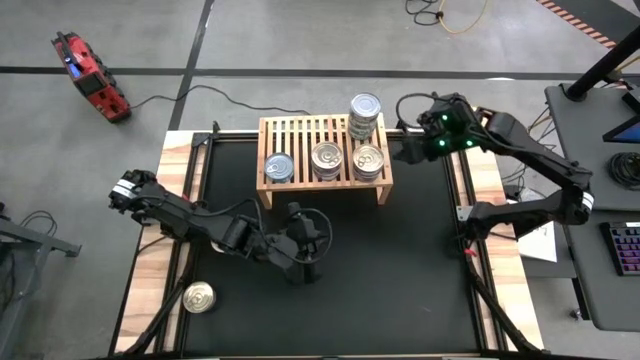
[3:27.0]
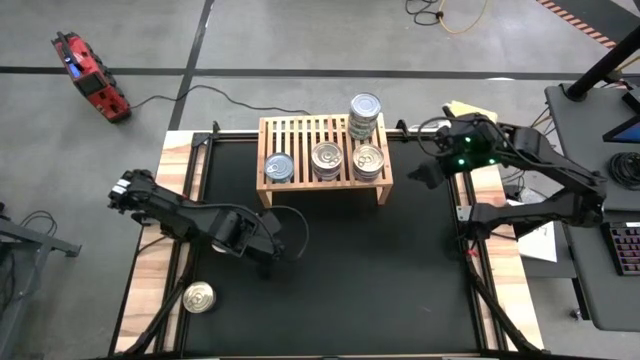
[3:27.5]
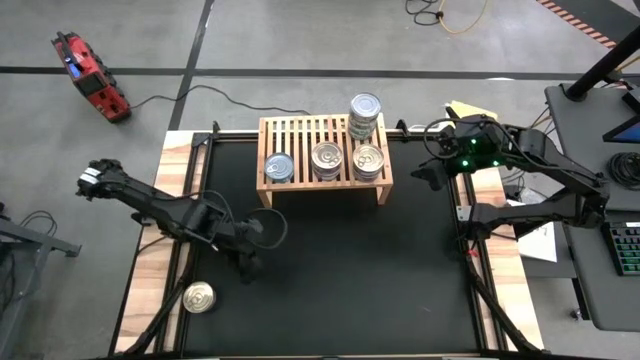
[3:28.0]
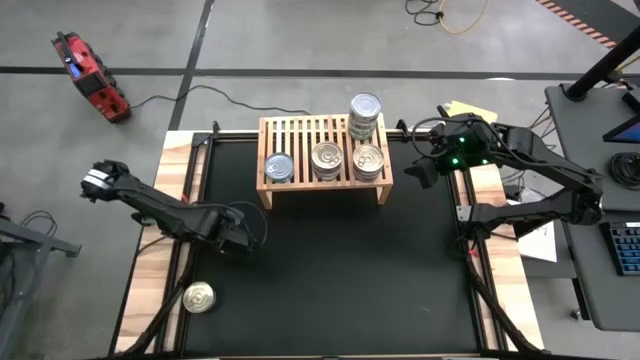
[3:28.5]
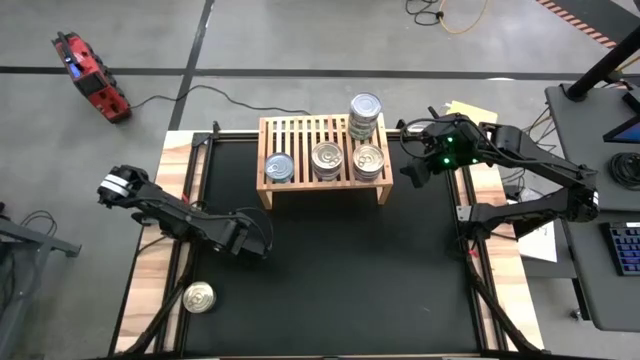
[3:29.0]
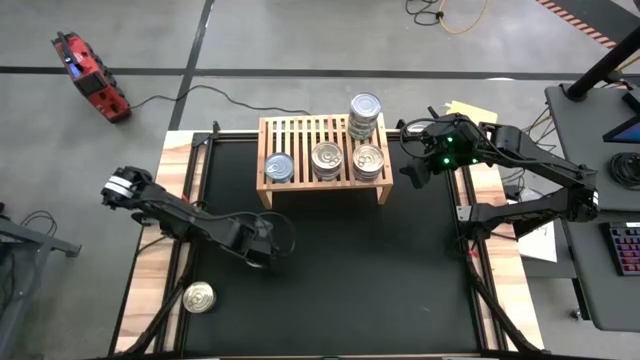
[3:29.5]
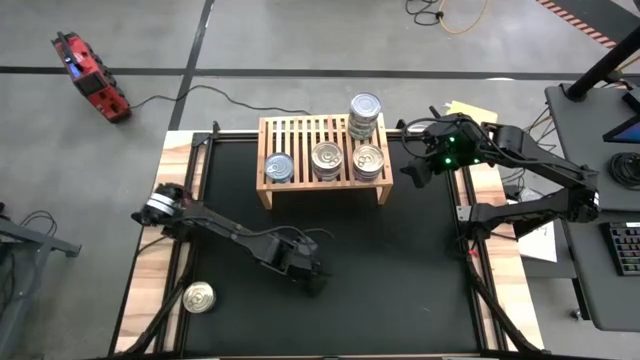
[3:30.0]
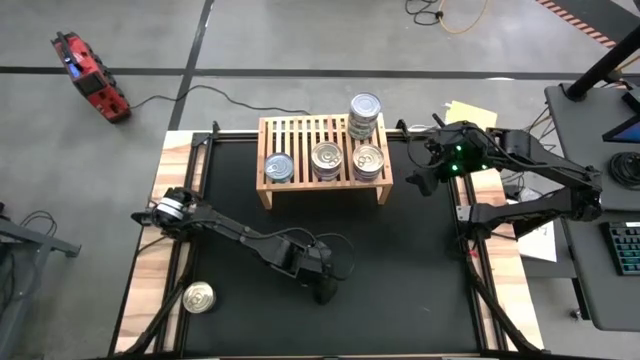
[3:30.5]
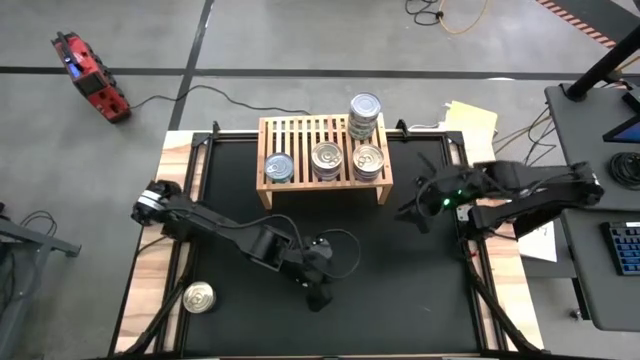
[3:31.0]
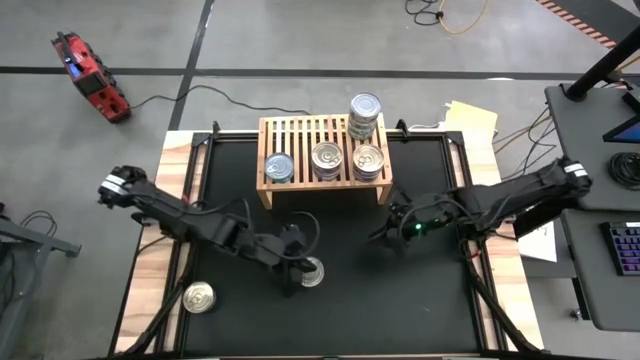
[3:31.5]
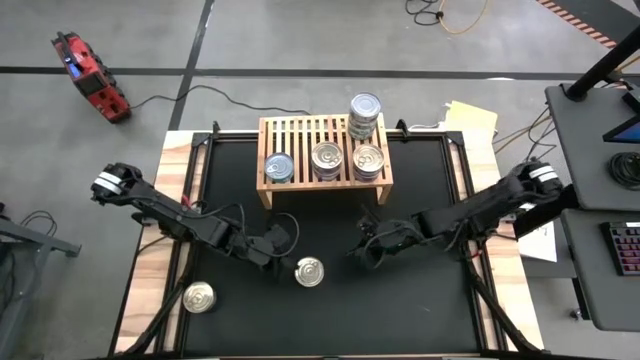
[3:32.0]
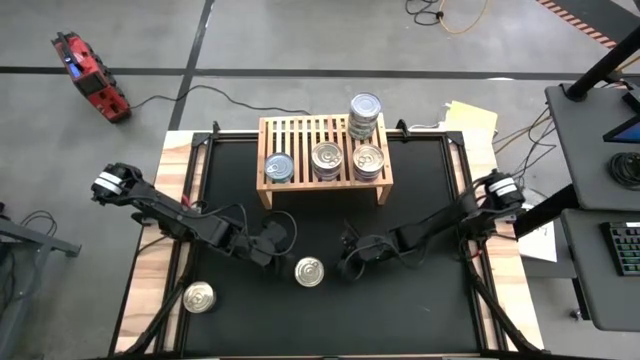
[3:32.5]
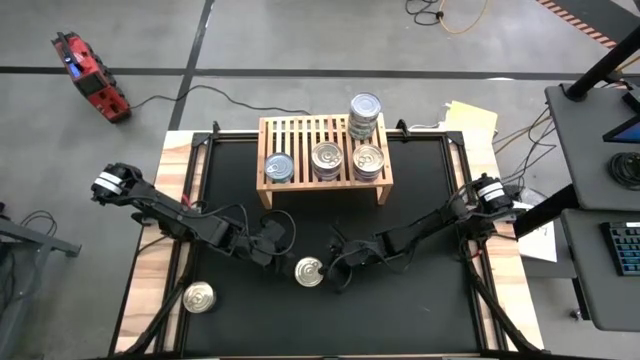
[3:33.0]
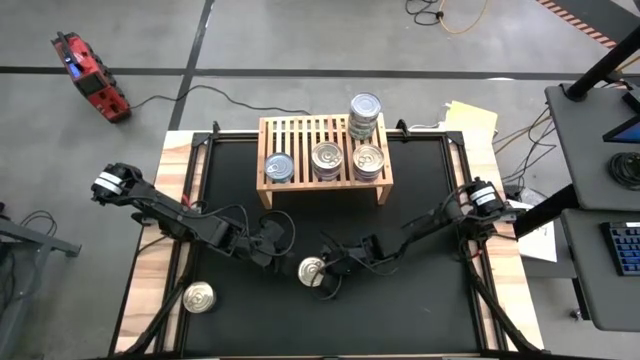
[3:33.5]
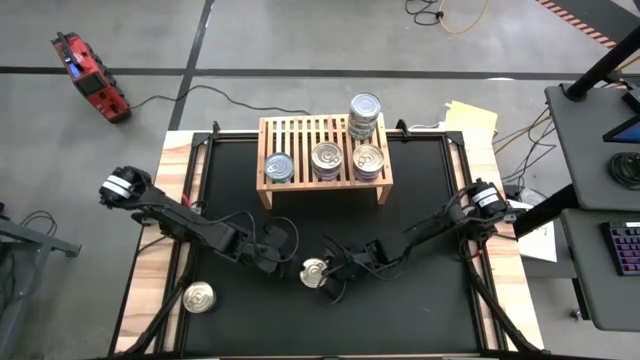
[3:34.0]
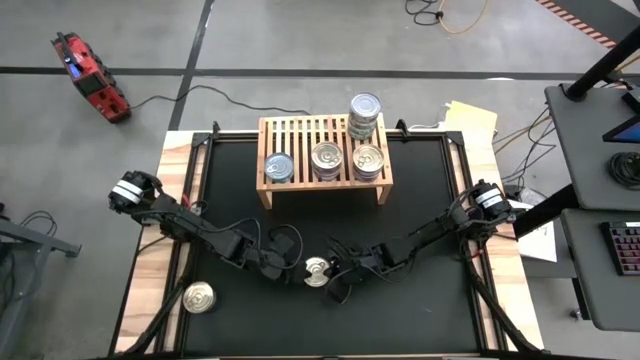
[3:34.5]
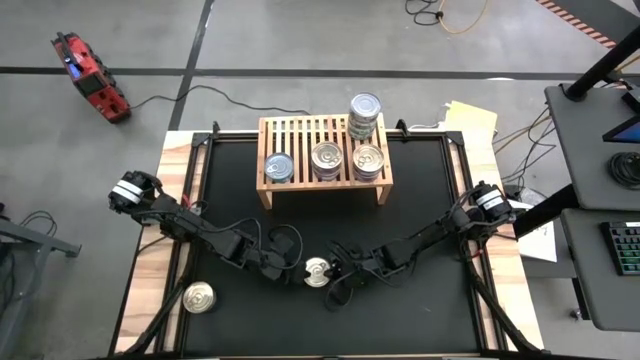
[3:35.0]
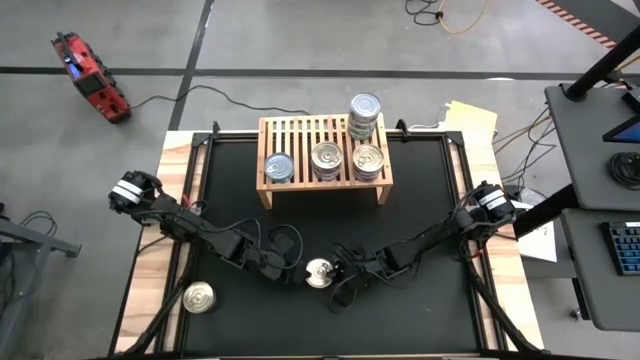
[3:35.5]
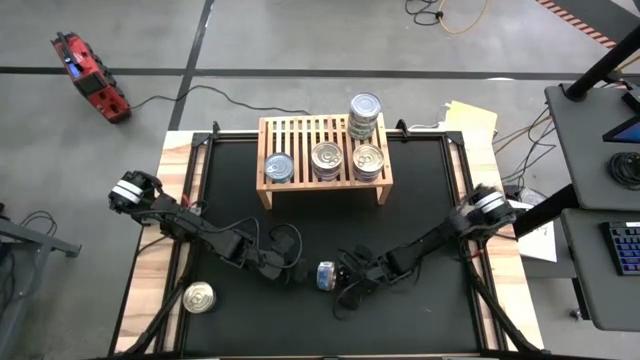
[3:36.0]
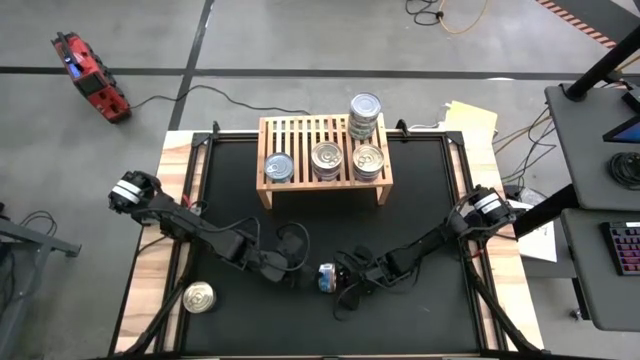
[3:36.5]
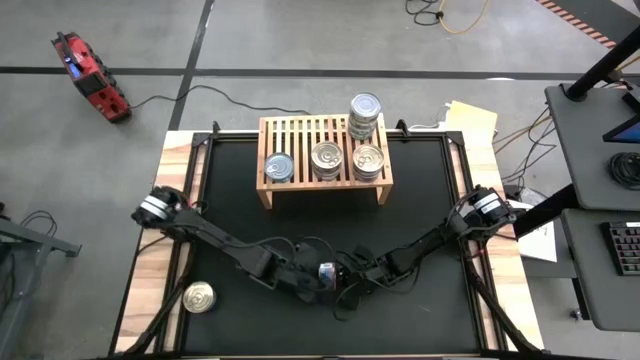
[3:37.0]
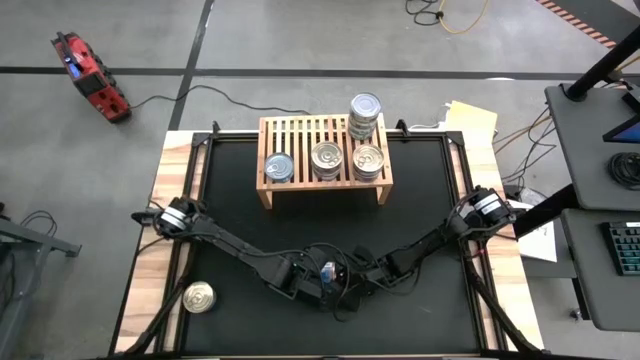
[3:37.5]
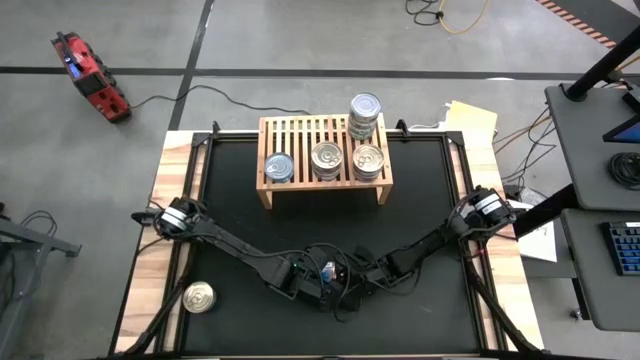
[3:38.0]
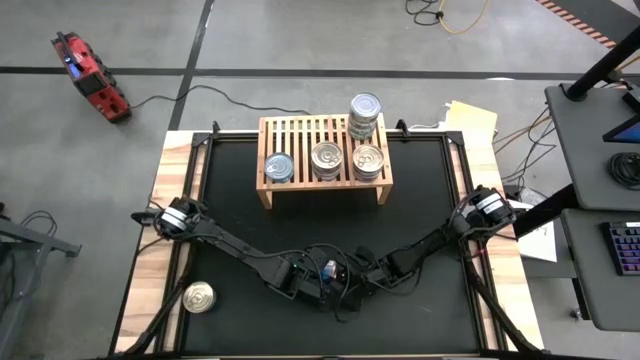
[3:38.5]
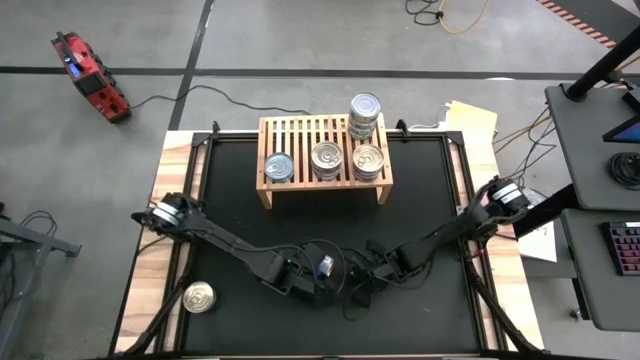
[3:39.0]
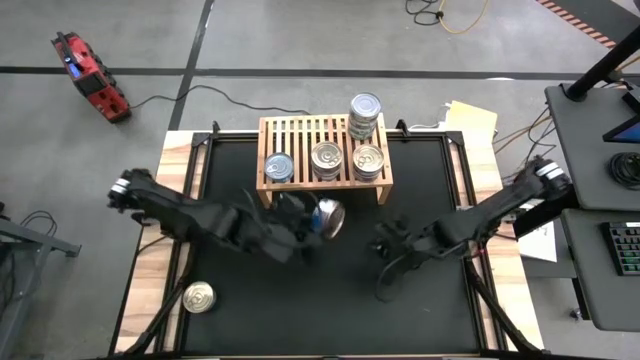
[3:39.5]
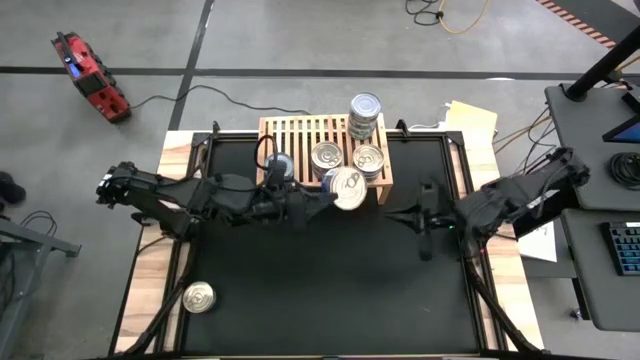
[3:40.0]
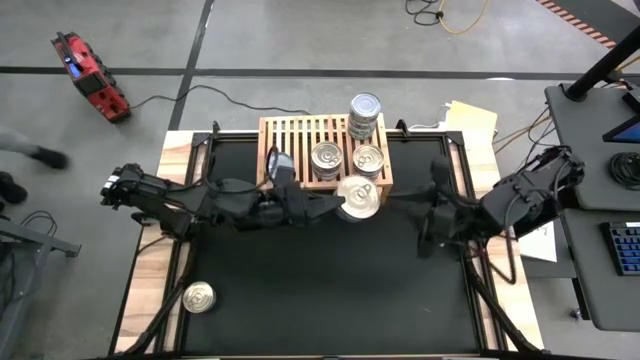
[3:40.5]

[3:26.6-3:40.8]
Task: Stack canned seafood by type on shelf
Stack the blue pink tuna can on top of the blue pink tuna can on the shelf

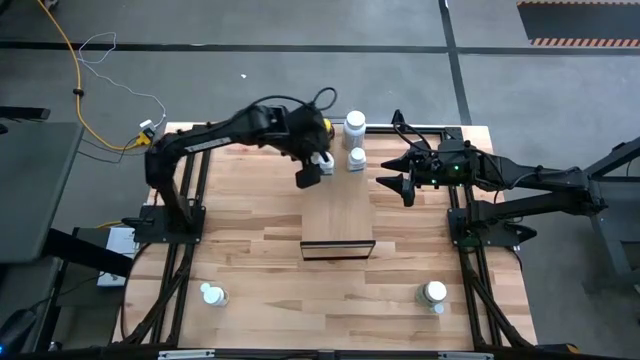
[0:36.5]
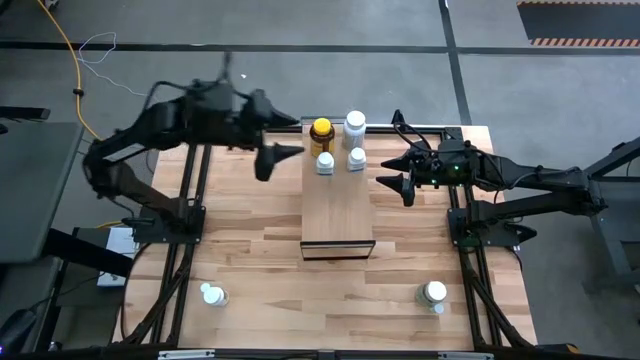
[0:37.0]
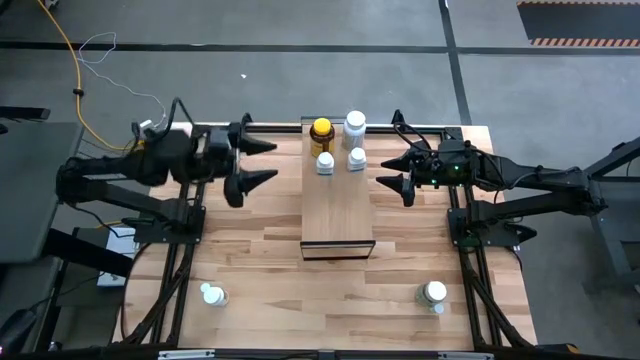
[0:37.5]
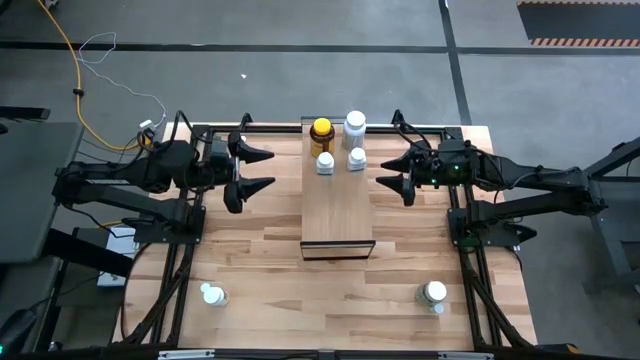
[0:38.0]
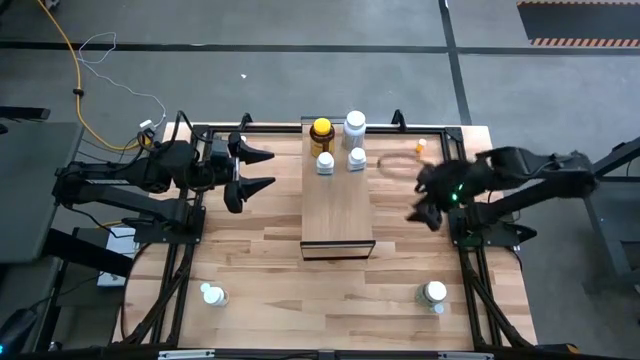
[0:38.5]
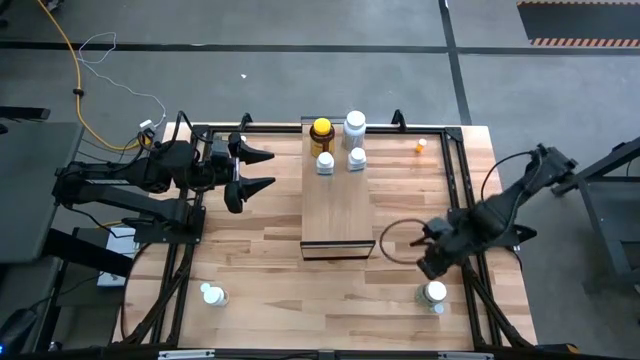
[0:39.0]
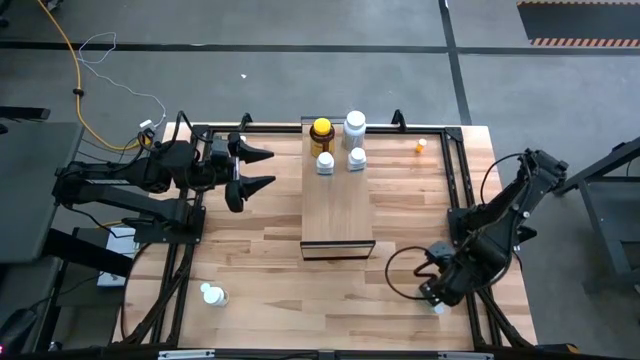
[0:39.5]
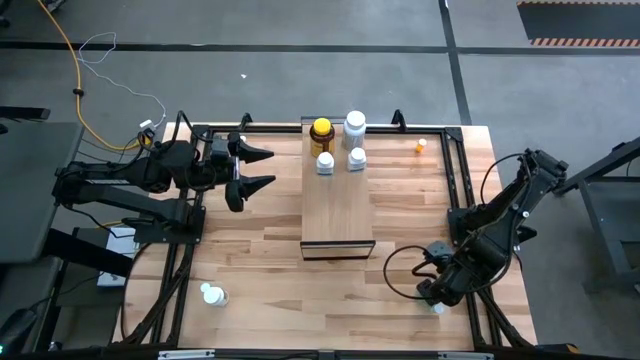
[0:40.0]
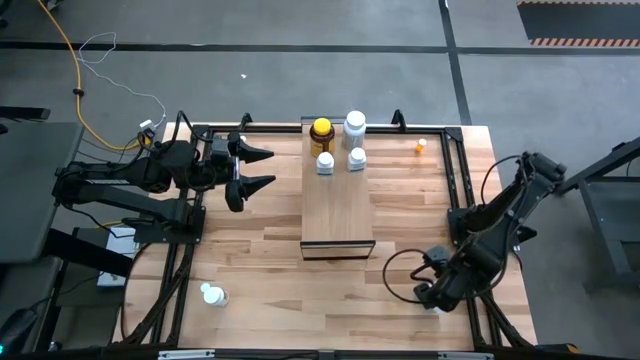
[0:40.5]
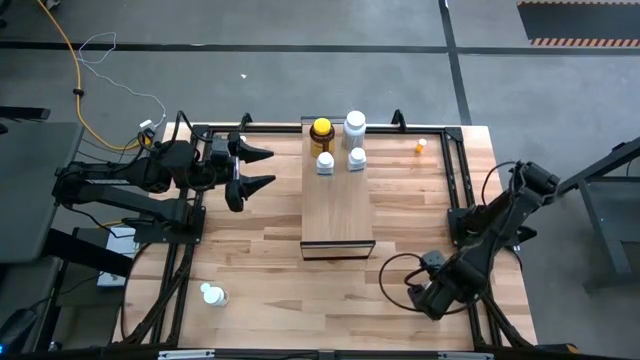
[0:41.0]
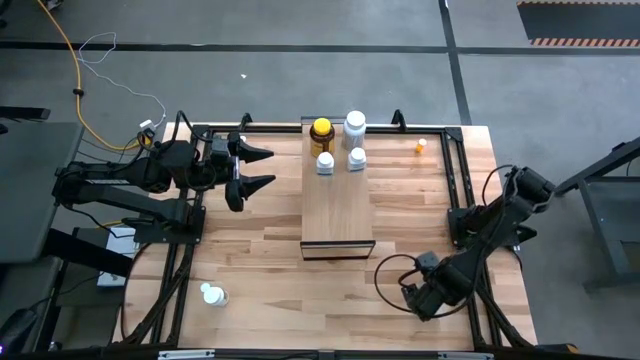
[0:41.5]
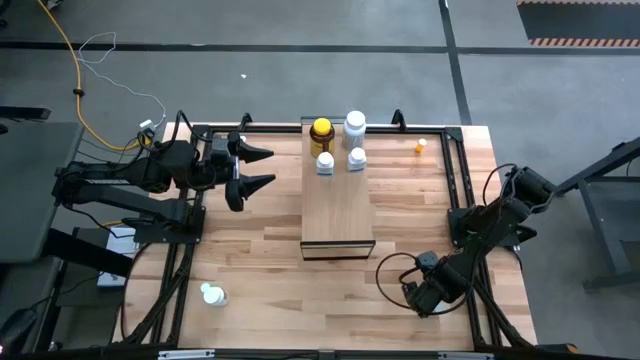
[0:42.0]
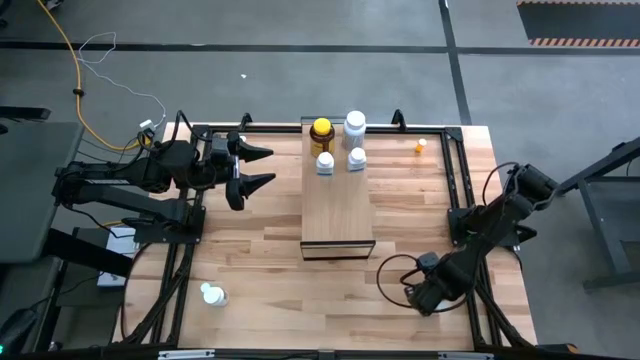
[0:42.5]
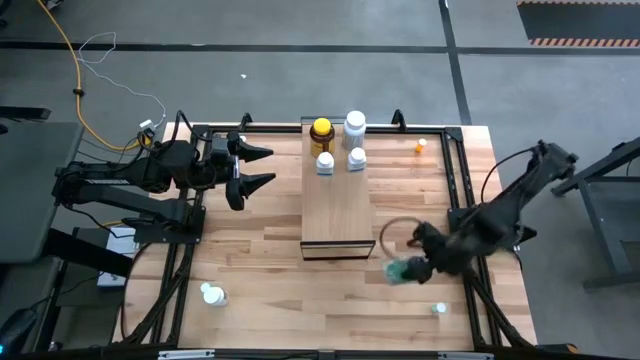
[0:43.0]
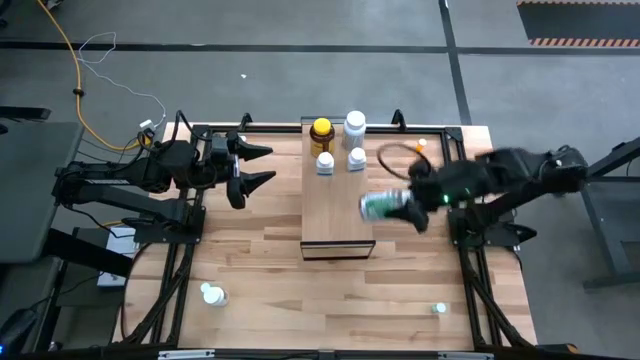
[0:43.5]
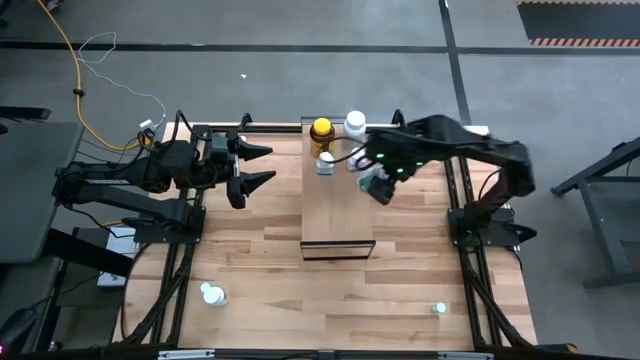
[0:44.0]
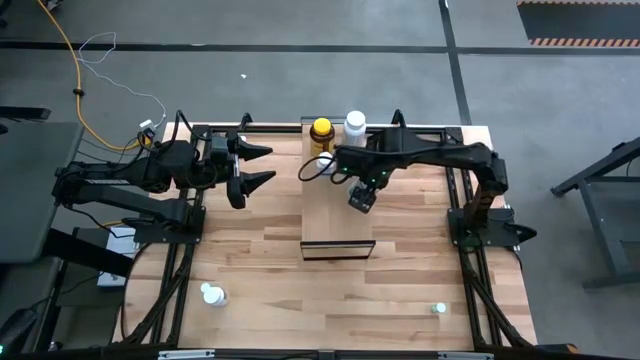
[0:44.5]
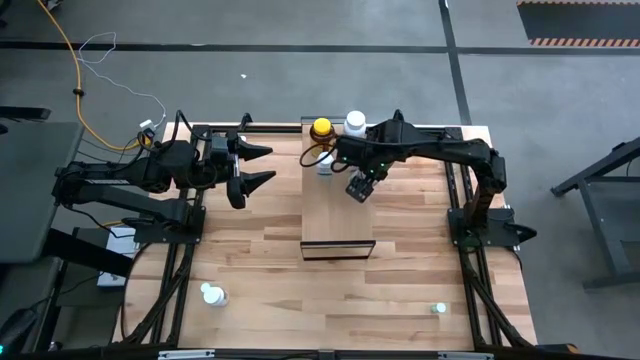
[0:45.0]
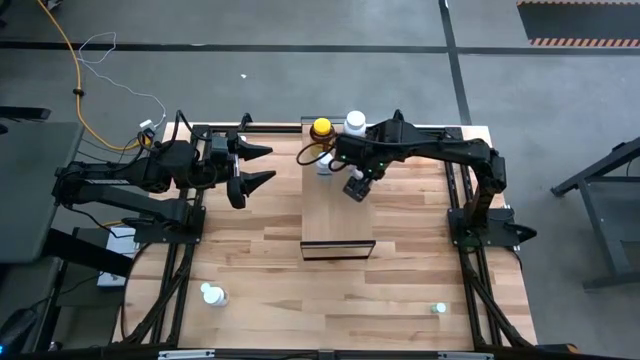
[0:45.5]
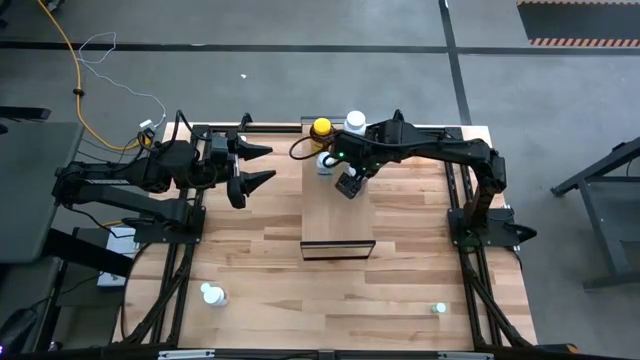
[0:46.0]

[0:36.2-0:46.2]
Task: Pick and place medicine bottles onto shelf by color
Put the transparent pill bottle on the shelf
